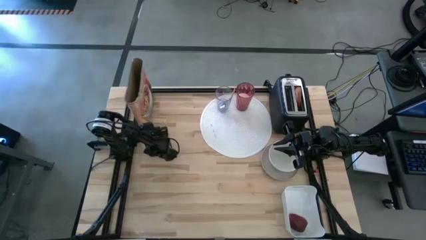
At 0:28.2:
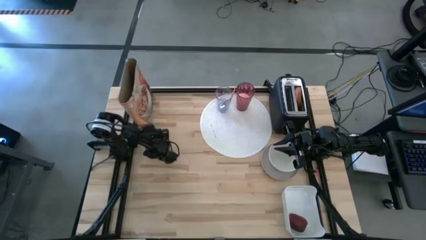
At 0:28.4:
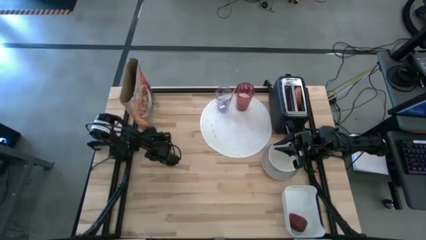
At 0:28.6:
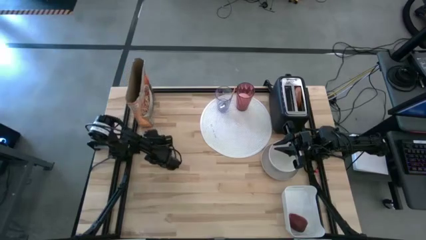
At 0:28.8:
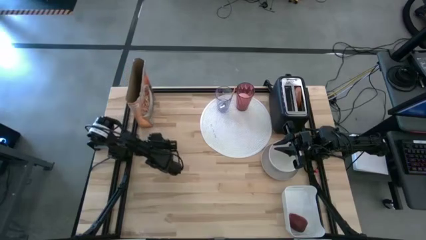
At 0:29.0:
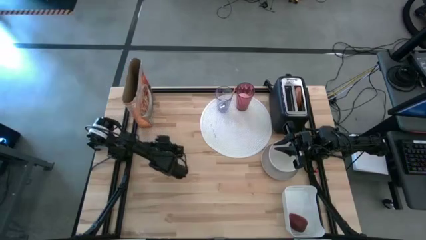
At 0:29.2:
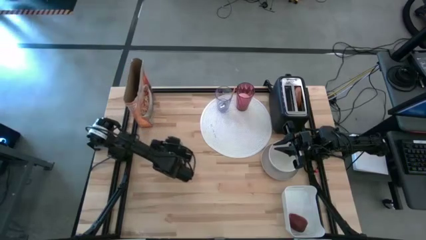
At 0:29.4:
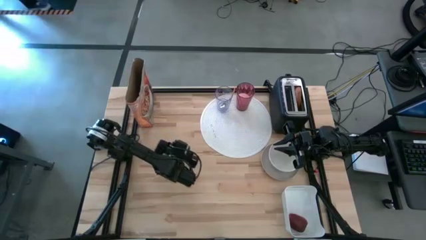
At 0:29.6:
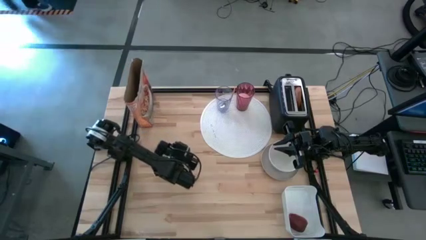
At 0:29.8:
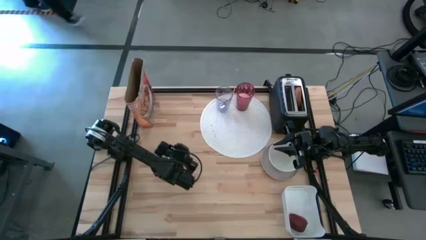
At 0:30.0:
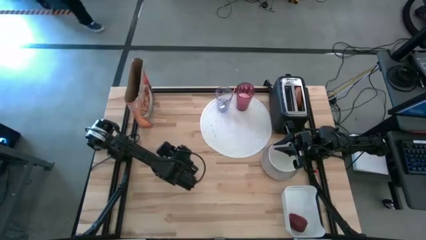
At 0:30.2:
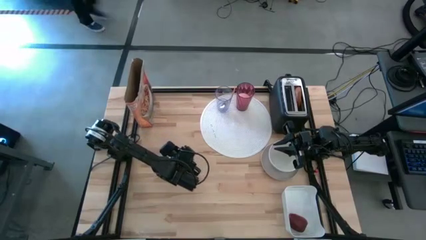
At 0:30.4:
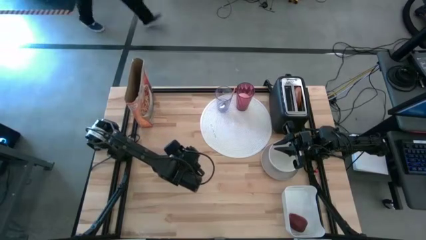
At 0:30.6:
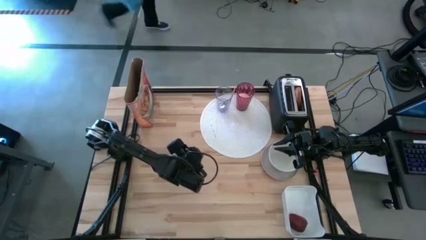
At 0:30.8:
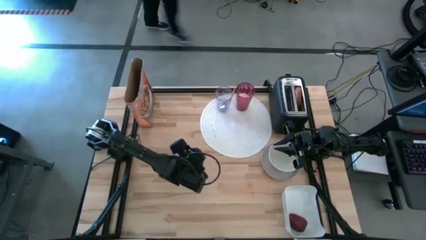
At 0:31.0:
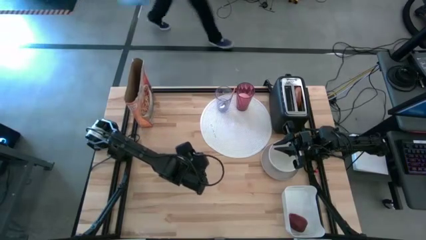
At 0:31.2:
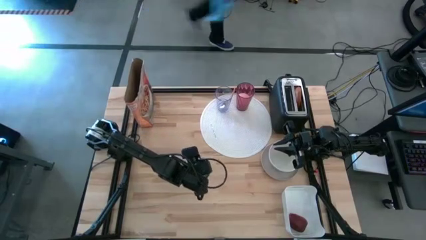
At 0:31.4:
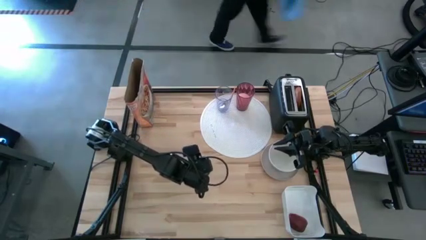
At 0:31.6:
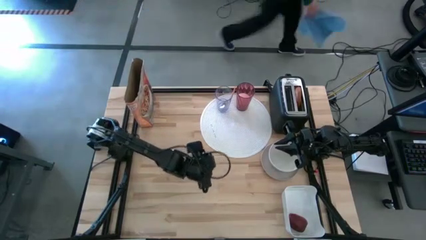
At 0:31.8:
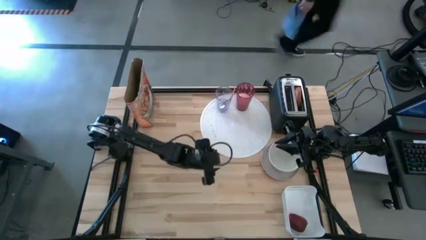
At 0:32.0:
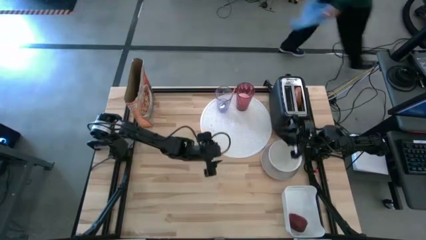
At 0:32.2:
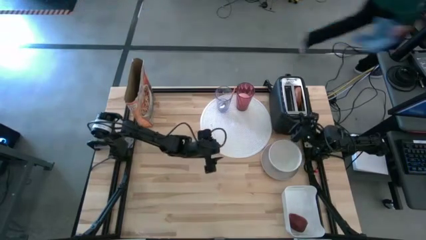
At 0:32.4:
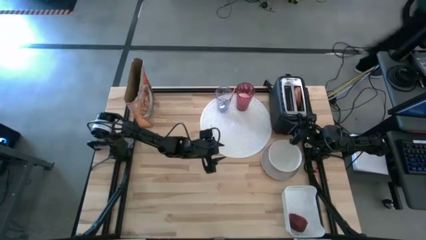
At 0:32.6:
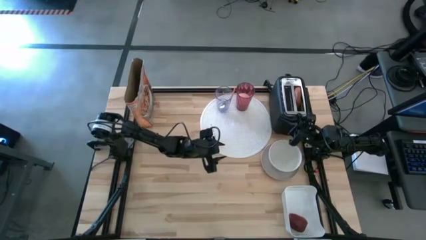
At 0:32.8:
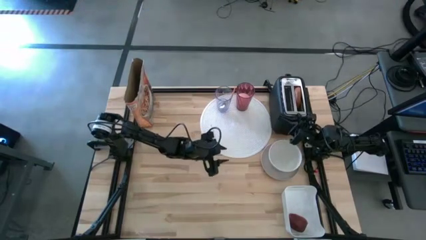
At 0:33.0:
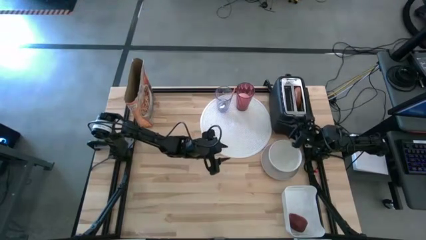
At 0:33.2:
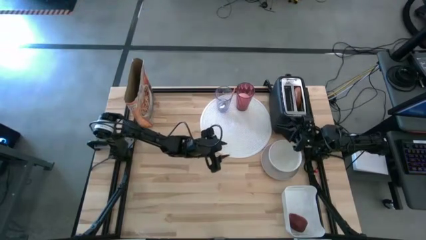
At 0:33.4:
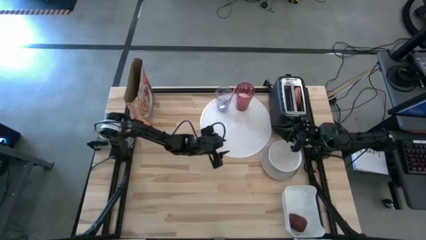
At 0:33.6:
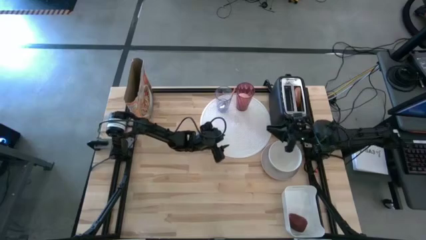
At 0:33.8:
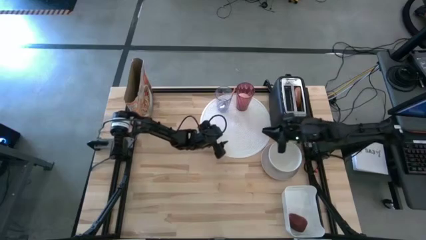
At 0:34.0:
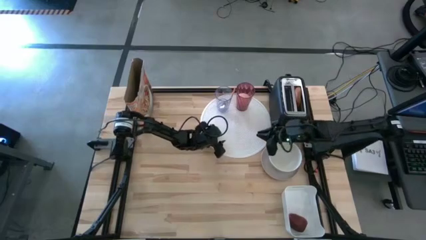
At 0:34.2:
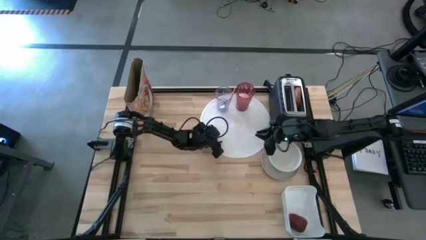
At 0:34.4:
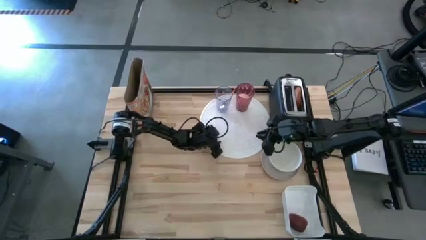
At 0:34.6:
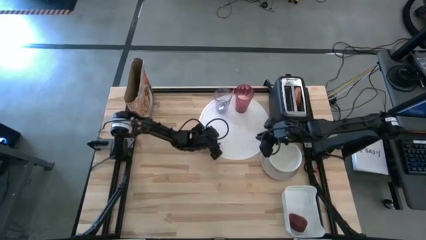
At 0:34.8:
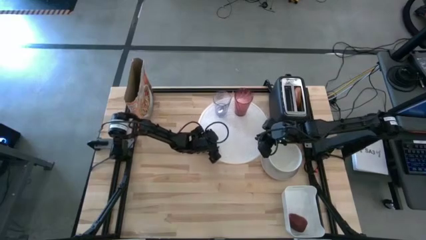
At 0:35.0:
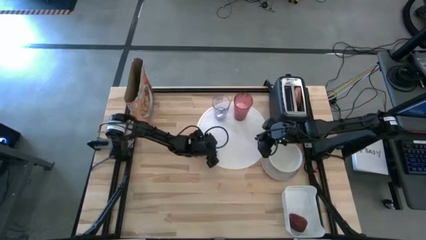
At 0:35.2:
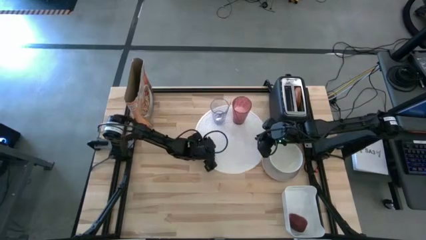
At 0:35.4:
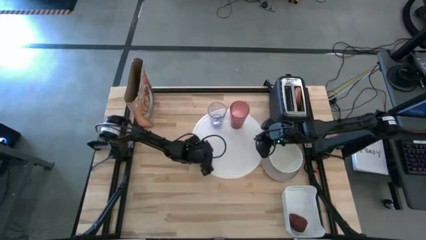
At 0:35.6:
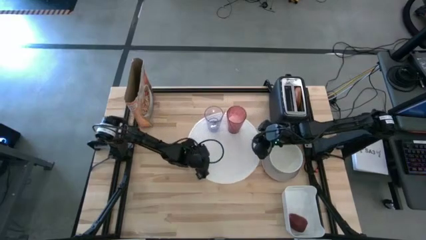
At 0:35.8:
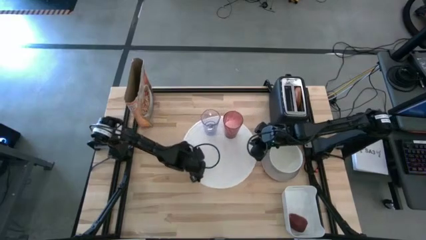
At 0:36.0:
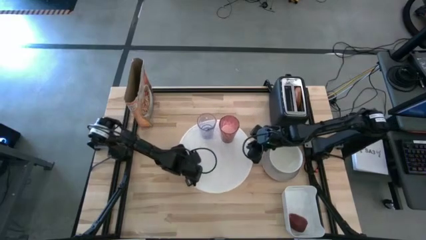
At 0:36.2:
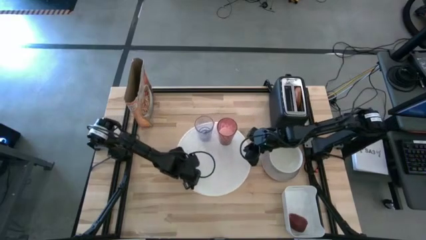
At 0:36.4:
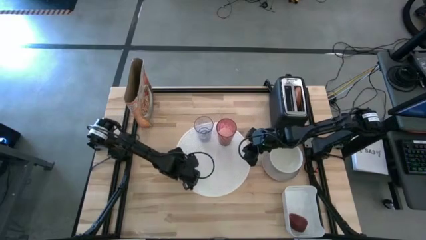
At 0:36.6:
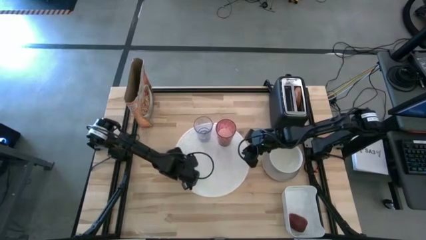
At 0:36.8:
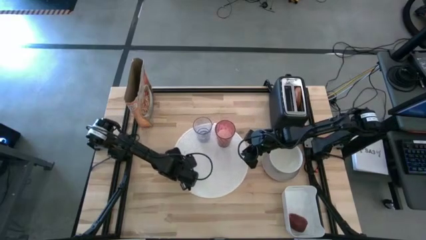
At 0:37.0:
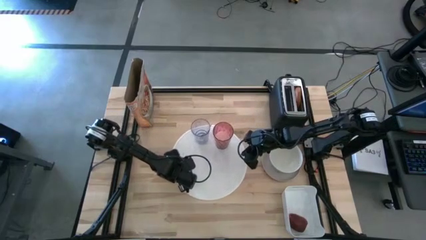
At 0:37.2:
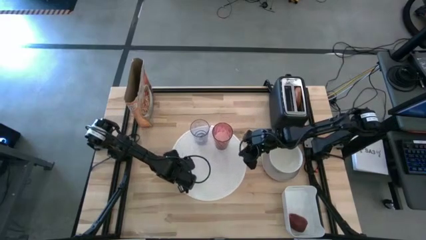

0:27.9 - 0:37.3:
Task: Arrange a breakfast setting
Move the white mat to the center of the table

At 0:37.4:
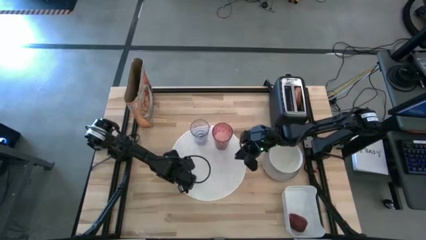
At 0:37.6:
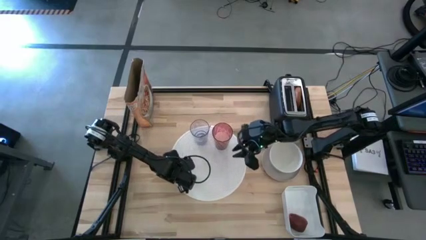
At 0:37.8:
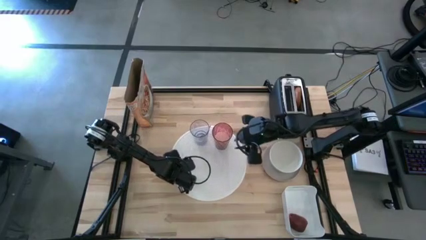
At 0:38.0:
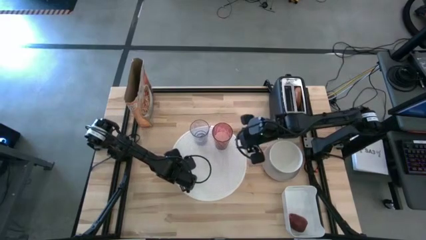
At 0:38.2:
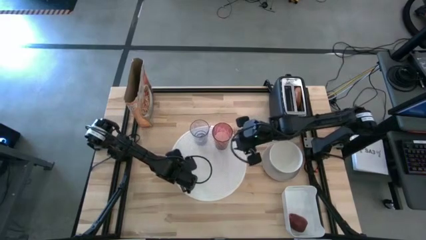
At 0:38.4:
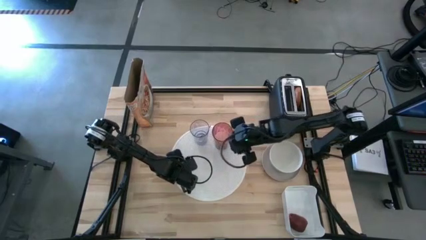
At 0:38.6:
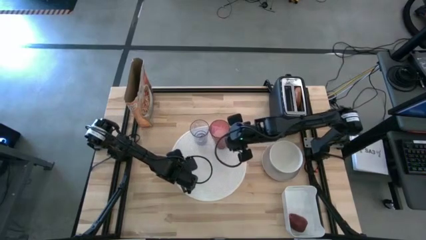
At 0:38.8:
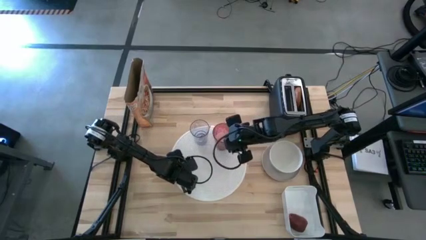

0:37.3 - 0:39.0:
Adjust the red cup on the white mat

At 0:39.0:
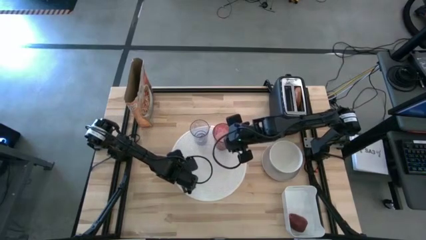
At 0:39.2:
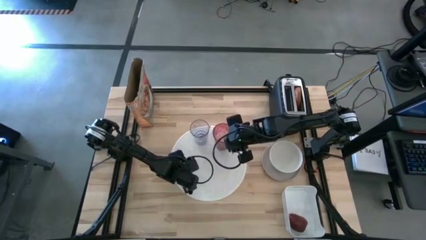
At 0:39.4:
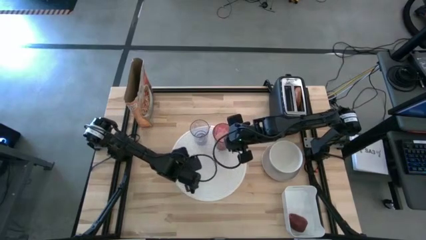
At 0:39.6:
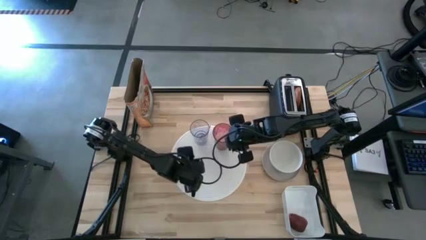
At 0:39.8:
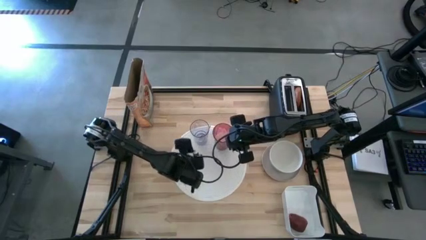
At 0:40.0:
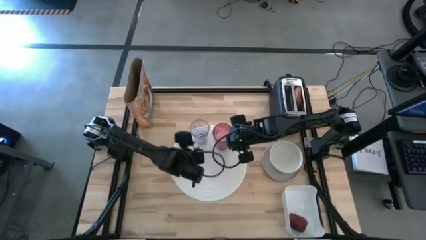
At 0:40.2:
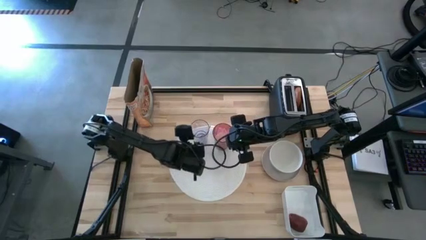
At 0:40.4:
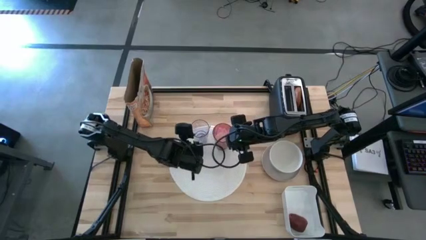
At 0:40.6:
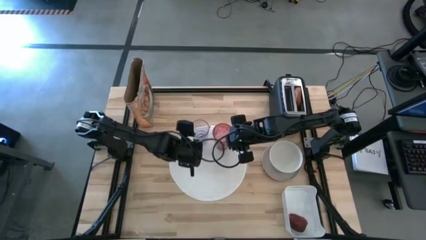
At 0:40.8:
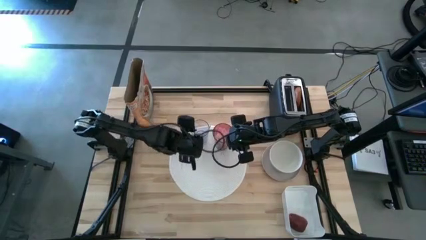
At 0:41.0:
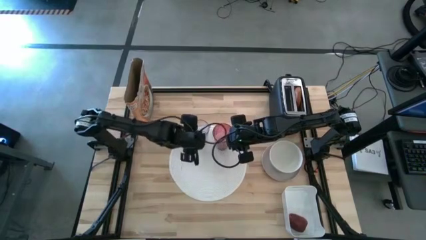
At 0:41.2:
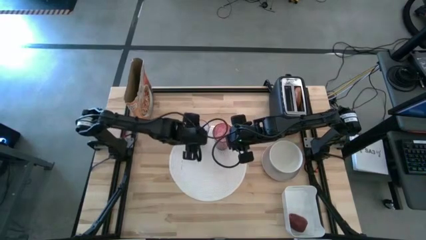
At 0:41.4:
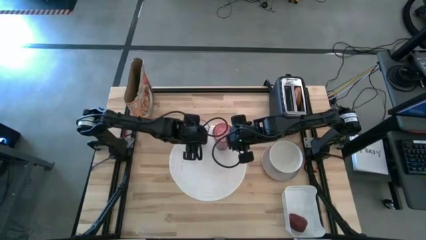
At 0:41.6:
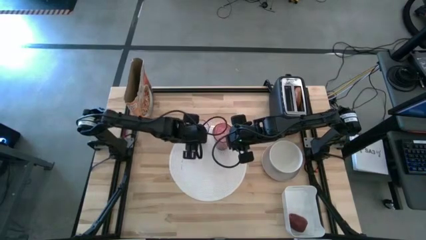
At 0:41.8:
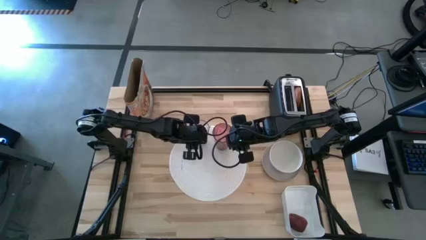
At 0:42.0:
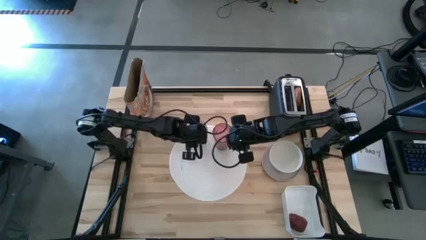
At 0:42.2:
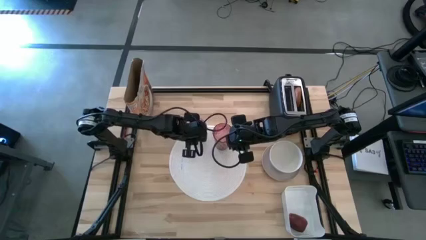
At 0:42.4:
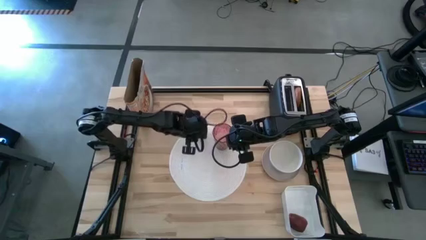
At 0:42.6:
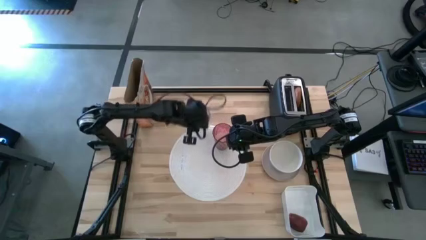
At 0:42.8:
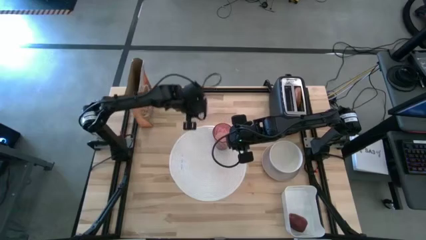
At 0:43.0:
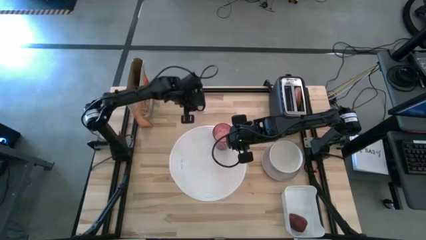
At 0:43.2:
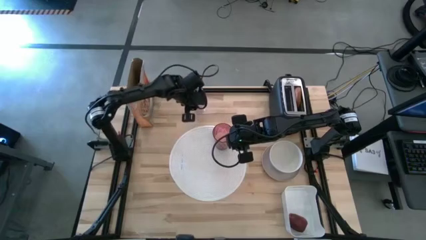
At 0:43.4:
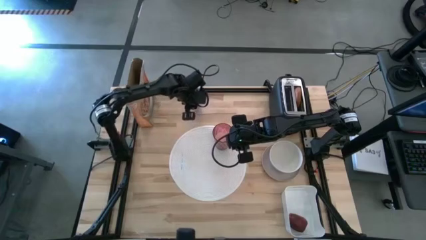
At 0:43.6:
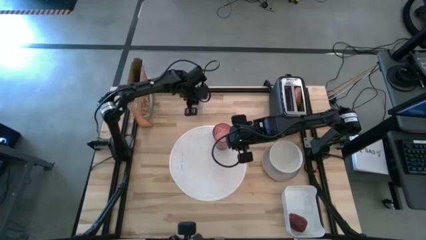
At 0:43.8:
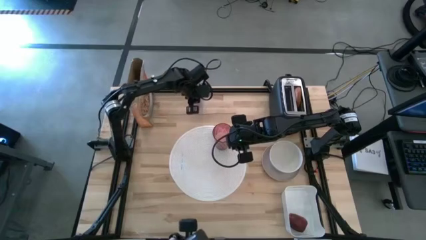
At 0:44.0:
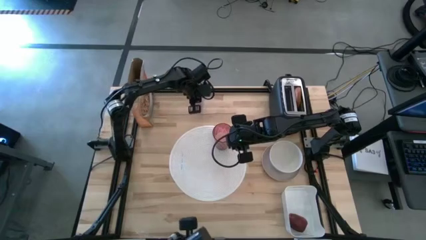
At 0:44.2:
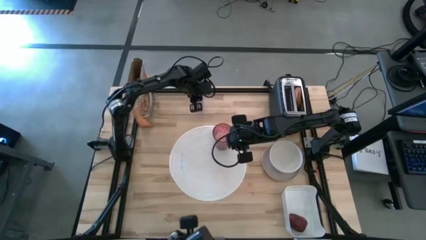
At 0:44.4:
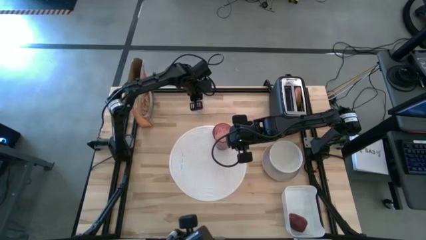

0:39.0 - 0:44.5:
Move the transparent cup to the top left of the table
